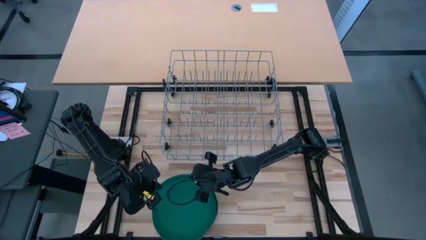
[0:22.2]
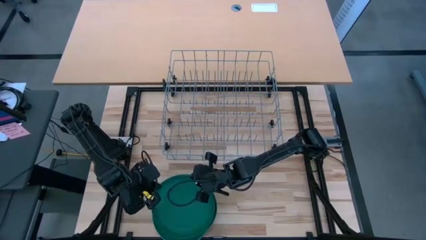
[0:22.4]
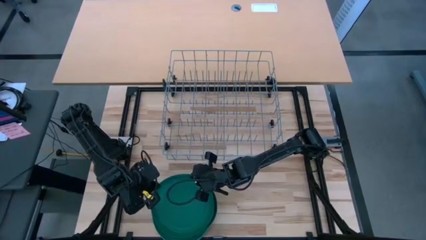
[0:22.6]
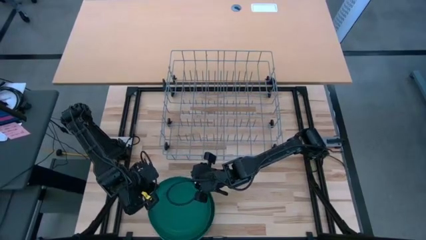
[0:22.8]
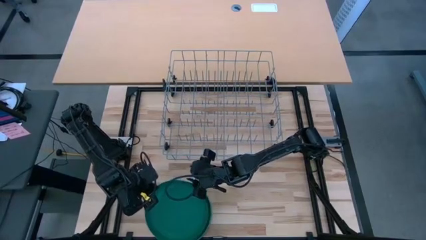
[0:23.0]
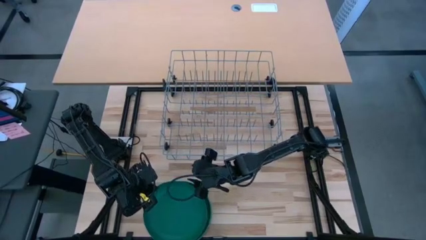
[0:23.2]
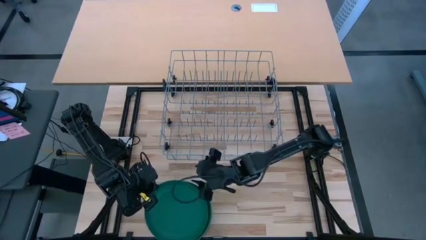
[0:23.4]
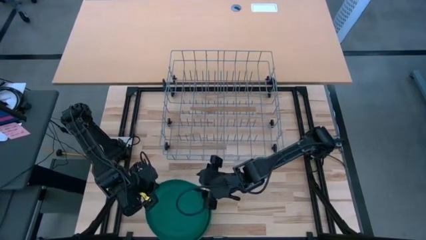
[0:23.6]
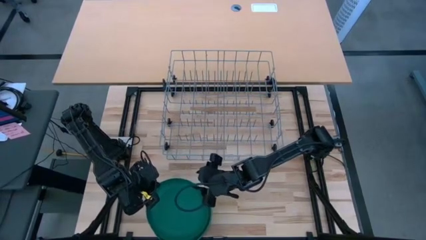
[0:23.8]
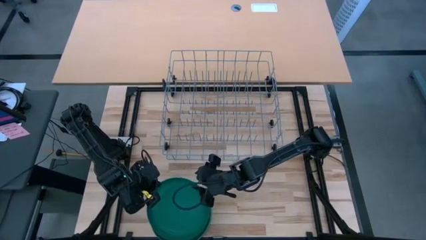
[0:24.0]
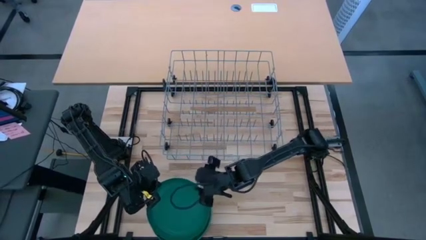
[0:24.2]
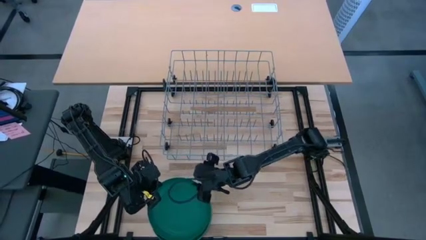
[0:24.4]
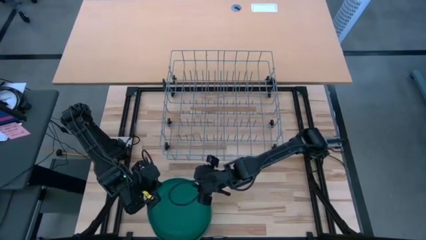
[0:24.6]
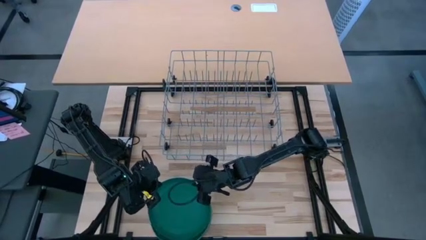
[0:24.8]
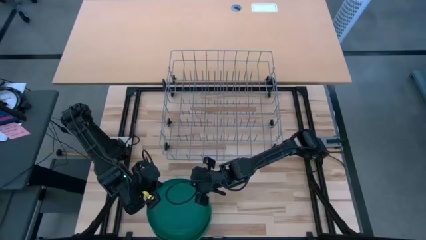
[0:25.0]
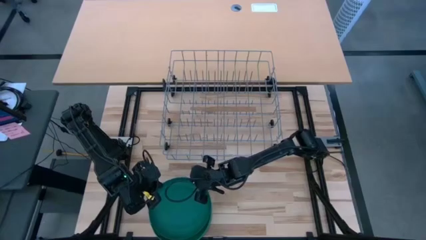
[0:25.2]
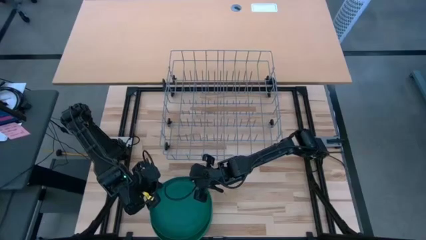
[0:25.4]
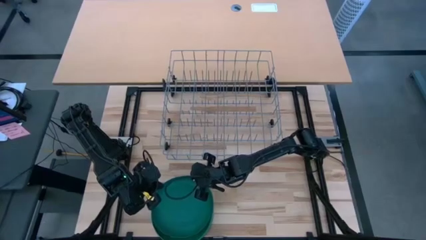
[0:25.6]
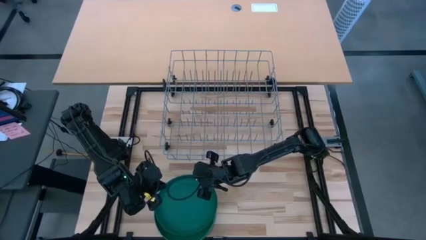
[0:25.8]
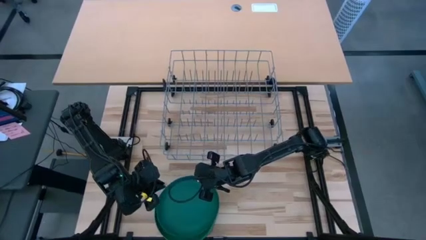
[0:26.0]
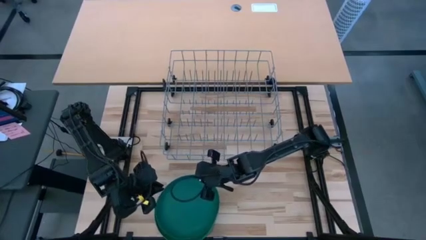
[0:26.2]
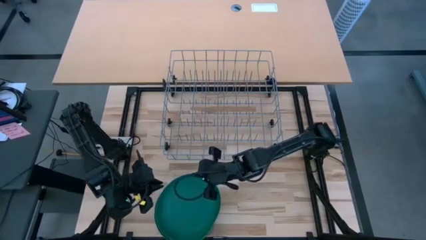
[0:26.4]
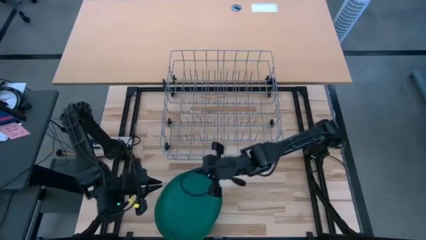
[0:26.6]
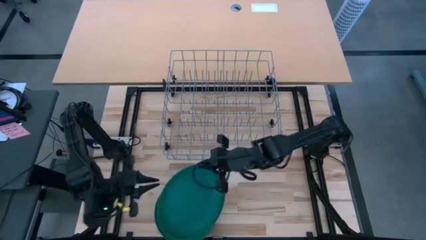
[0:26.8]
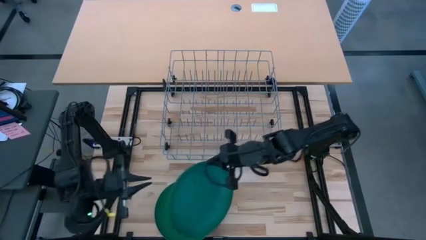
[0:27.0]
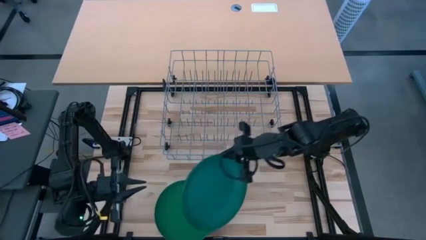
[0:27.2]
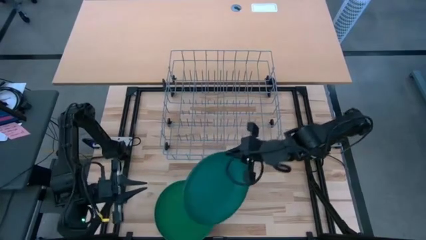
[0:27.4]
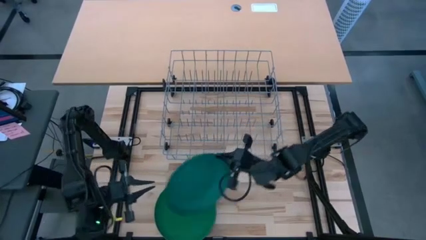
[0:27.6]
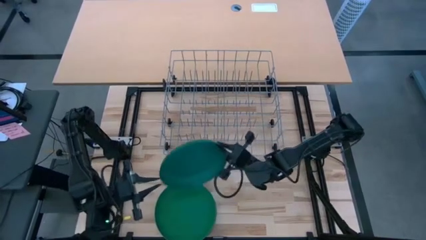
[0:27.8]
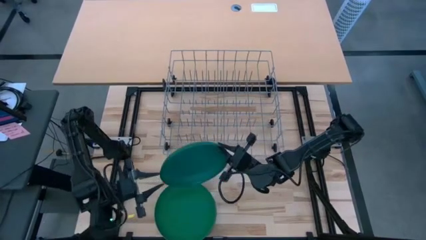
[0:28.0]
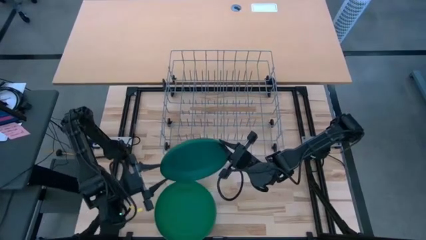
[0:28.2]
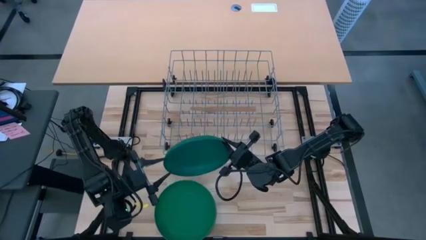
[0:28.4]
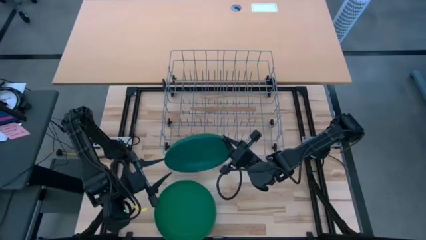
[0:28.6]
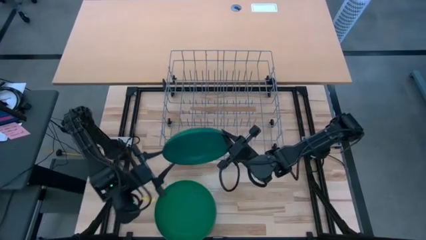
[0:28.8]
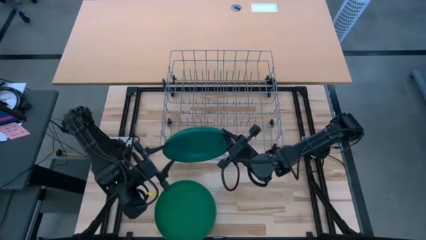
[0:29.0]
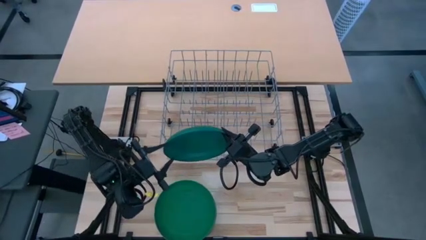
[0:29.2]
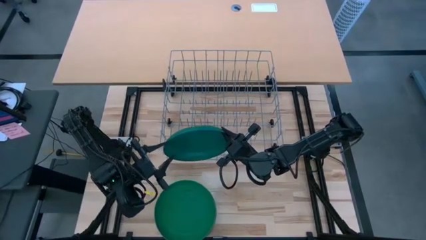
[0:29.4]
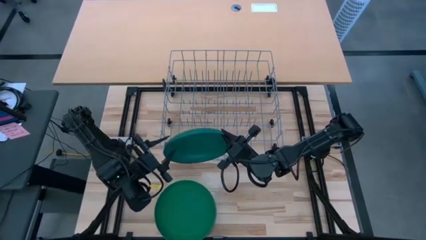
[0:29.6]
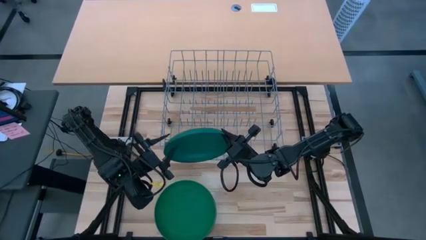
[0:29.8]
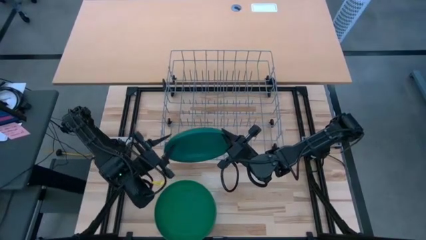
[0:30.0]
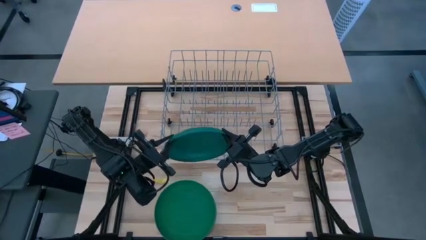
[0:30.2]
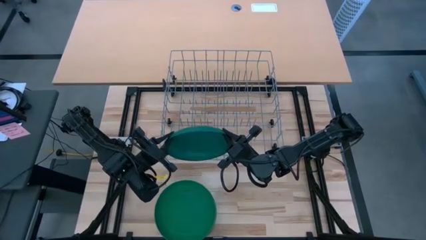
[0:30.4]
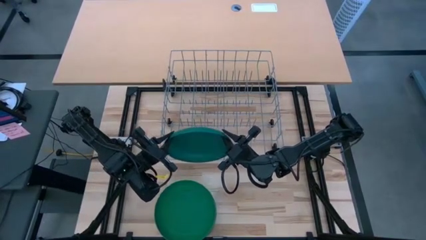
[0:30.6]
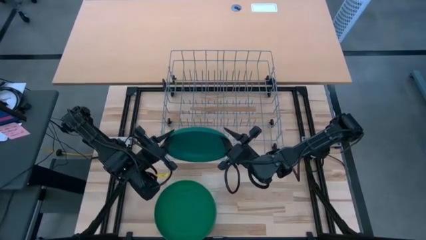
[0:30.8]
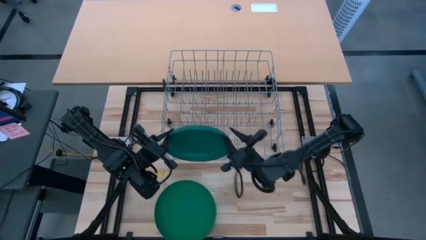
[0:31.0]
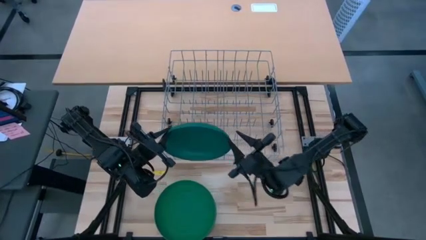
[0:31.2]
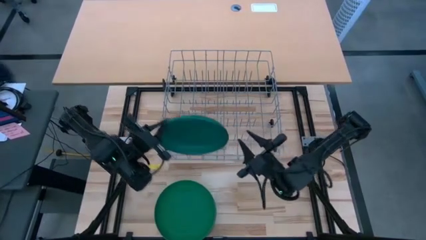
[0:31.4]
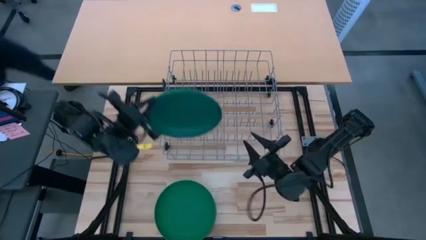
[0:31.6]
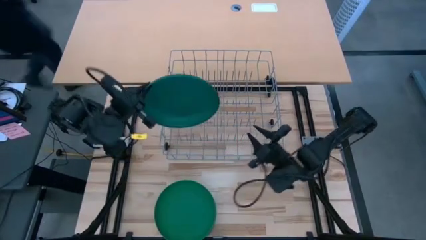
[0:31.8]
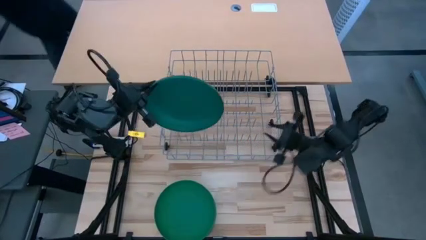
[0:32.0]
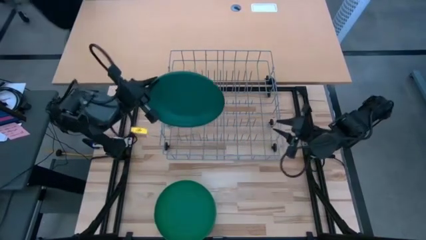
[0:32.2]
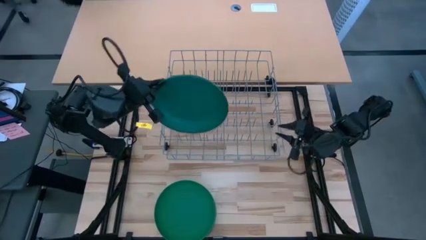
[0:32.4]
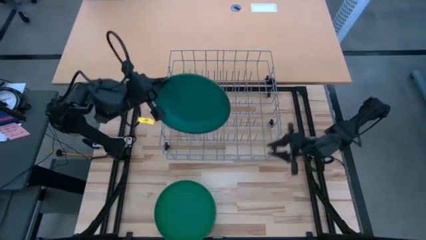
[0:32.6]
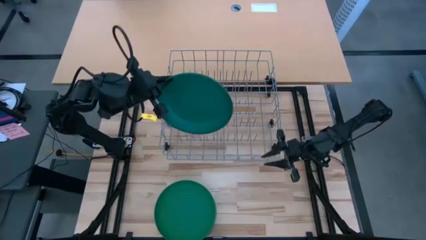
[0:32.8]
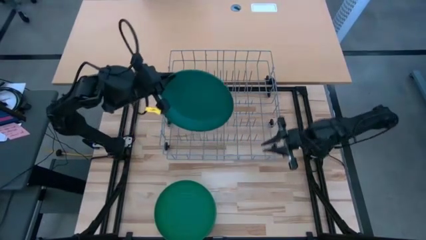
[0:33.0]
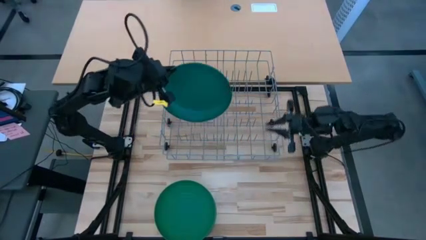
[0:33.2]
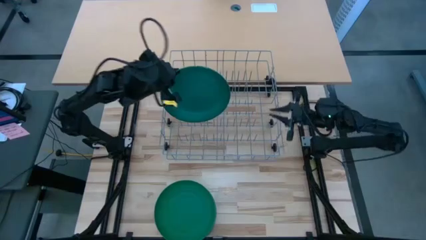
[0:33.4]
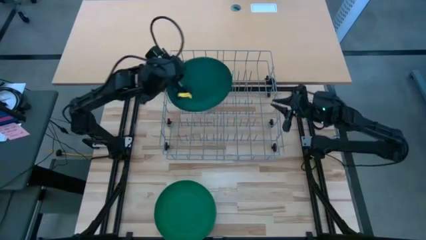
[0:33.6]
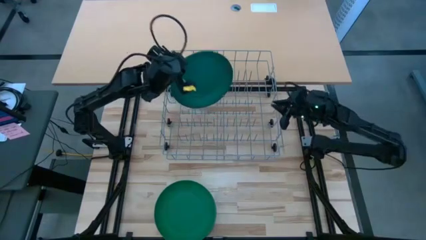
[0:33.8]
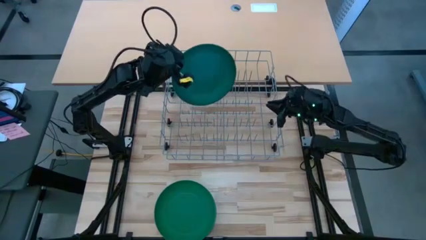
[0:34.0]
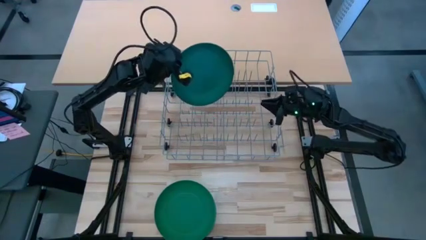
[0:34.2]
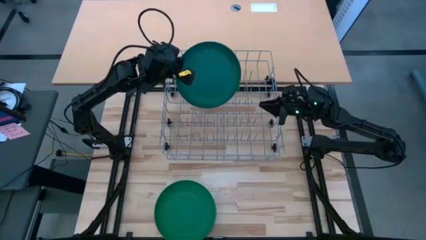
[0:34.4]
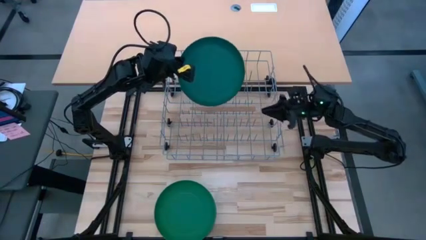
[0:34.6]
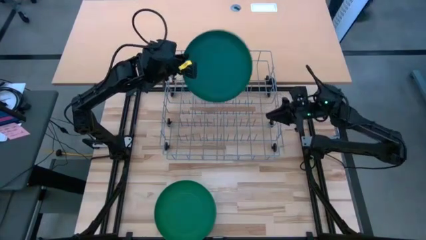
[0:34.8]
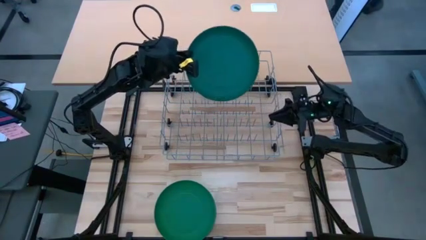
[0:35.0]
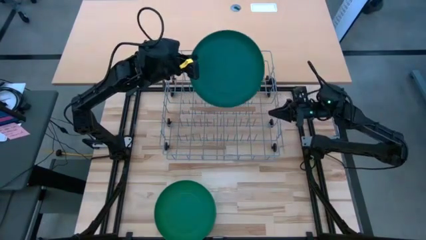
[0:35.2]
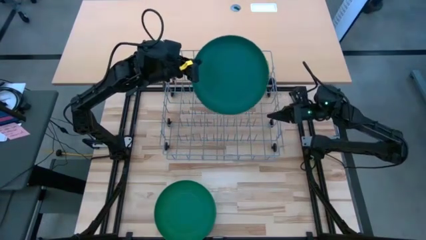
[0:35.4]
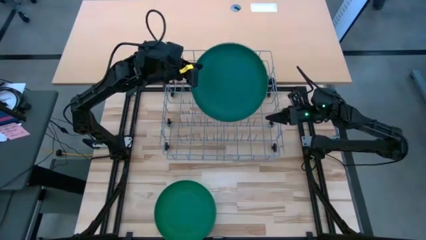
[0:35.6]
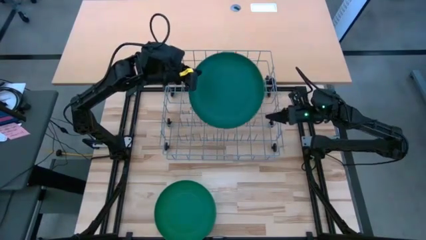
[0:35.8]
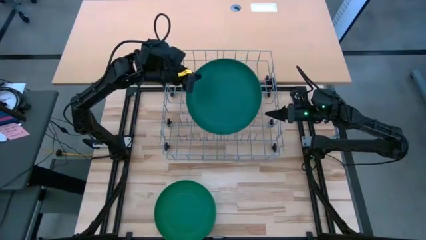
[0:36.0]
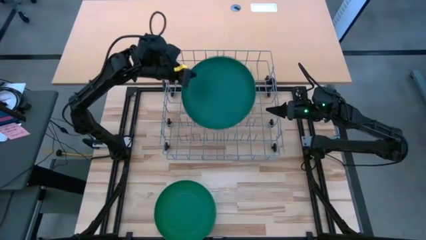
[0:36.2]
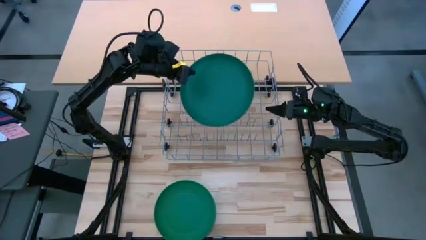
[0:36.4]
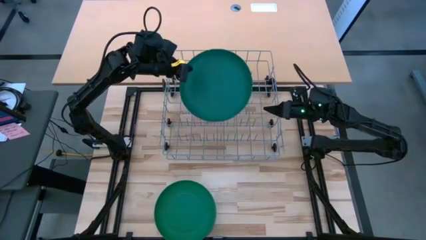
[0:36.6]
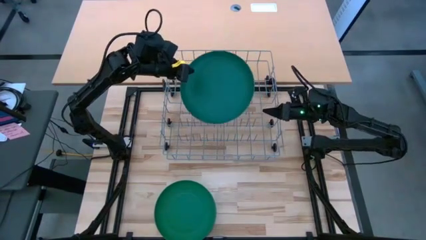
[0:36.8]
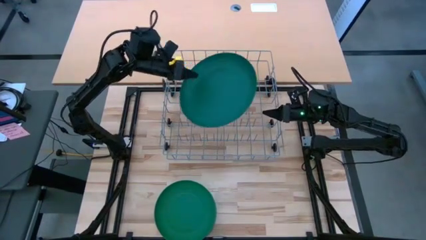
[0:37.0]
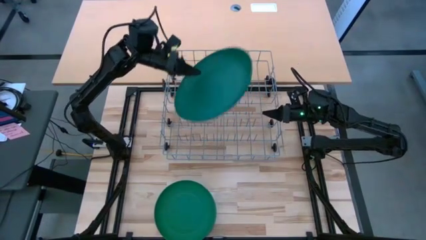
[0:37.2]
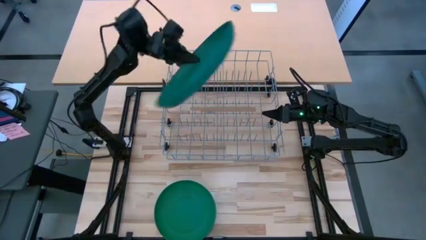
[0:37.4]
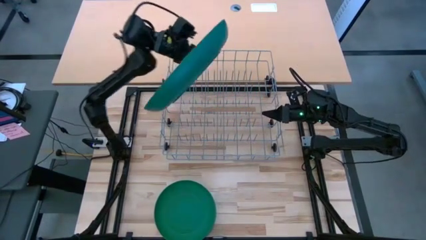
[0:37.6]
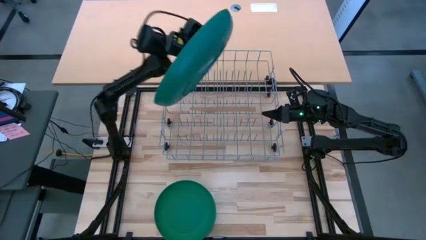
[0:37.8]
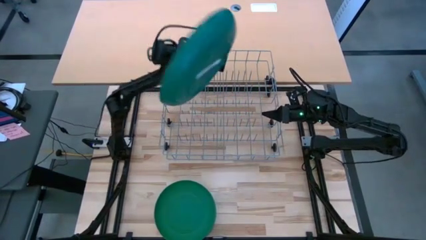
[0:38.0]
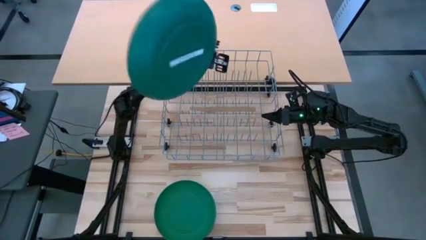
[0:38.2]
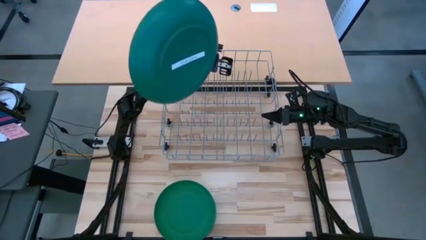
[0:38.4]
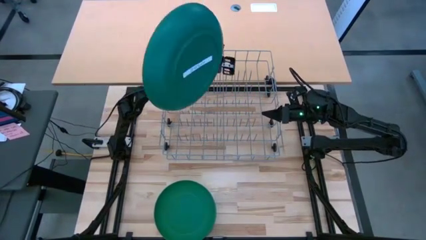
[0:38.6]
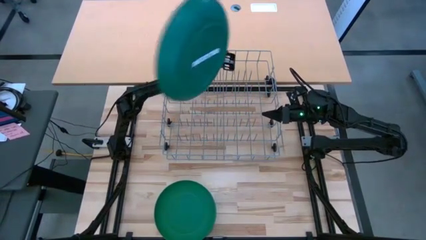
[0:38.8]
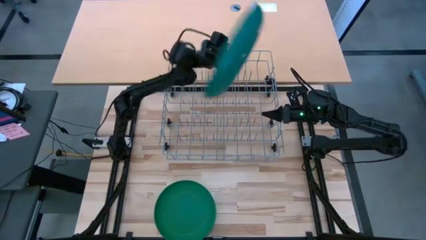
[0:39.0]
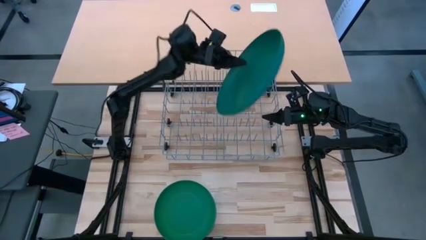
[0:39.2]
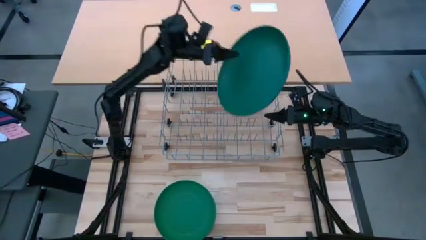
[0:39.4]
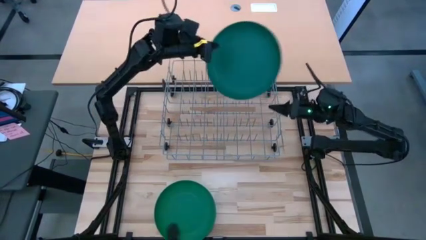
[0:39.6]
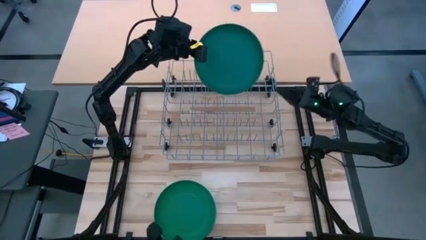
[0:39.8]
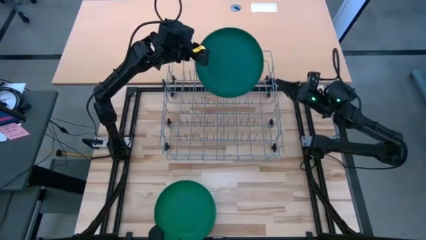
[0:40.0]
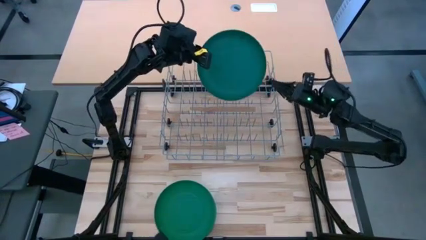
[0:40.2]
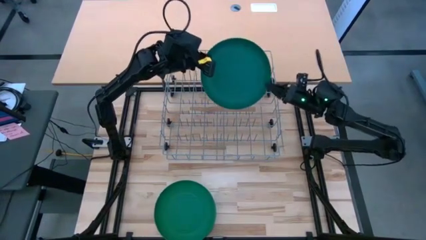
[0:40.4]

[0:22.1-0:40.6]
Task: Sort dishes
Put the dark blue plate in the dish rack
